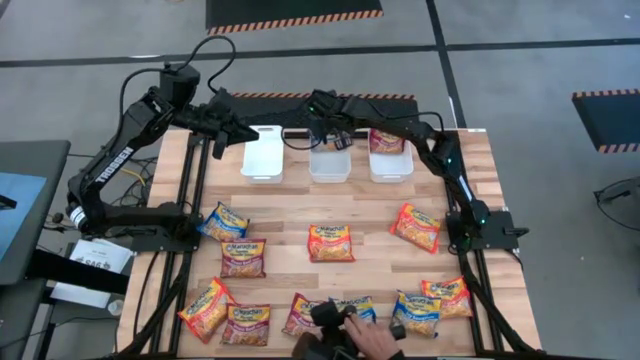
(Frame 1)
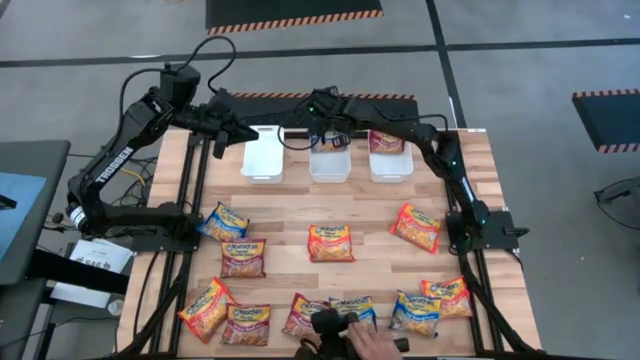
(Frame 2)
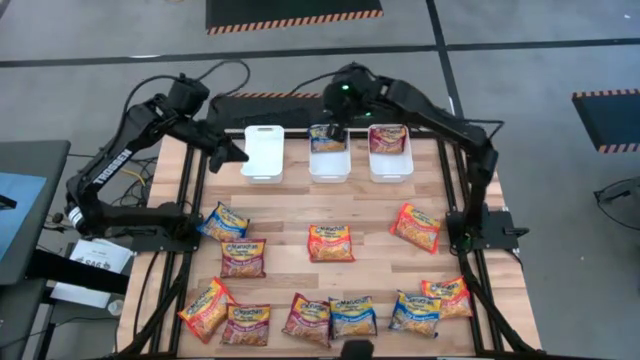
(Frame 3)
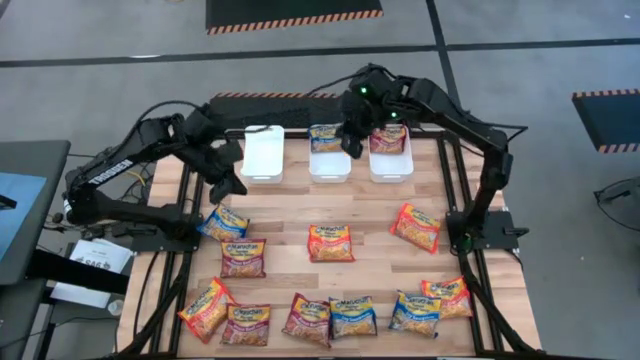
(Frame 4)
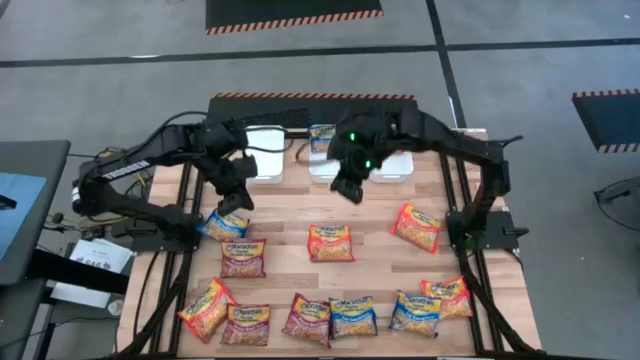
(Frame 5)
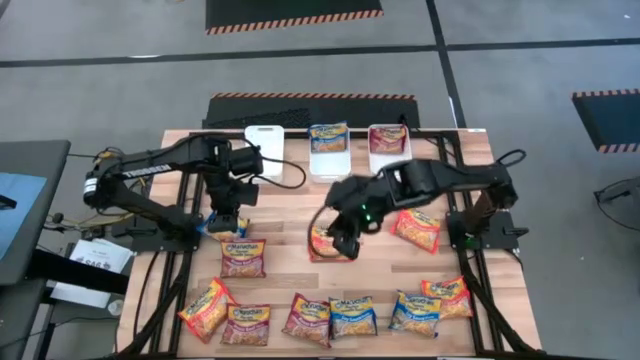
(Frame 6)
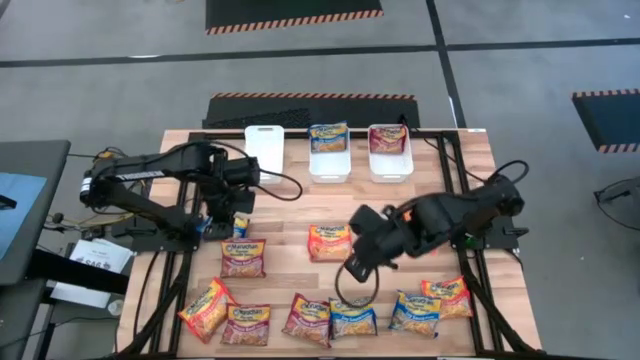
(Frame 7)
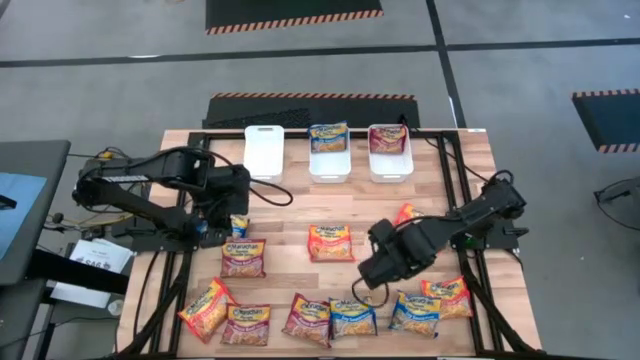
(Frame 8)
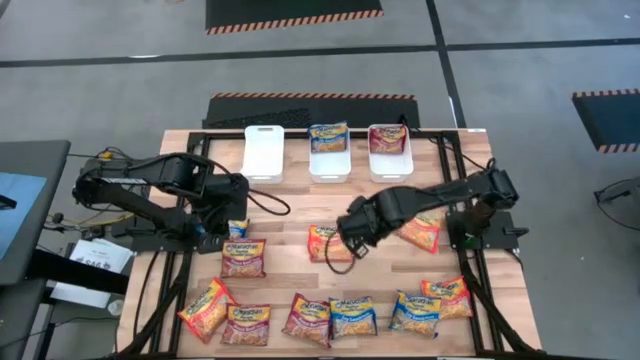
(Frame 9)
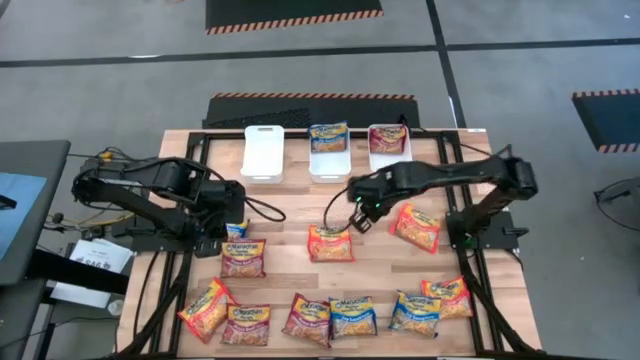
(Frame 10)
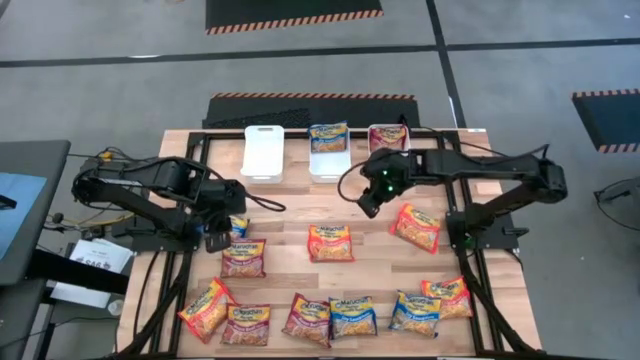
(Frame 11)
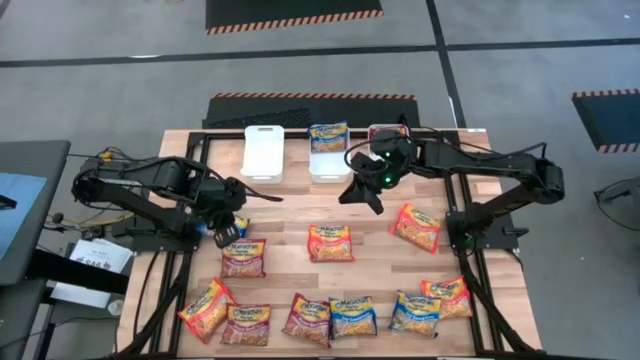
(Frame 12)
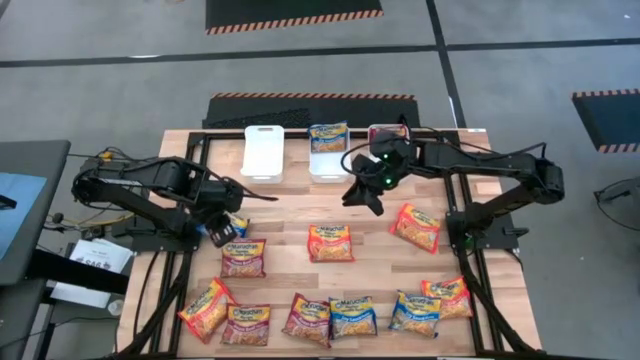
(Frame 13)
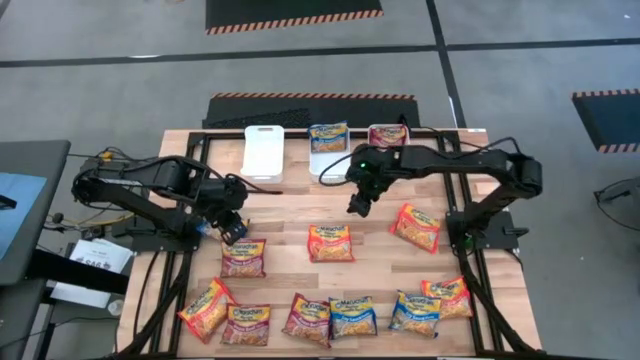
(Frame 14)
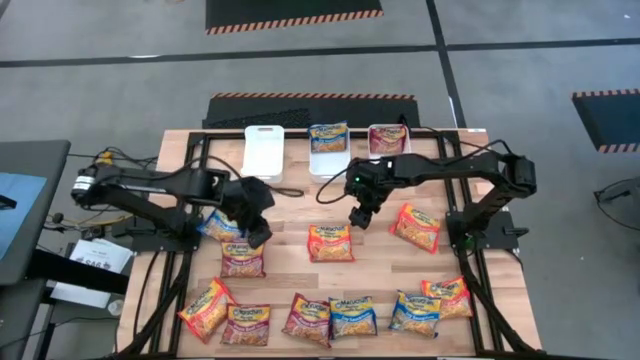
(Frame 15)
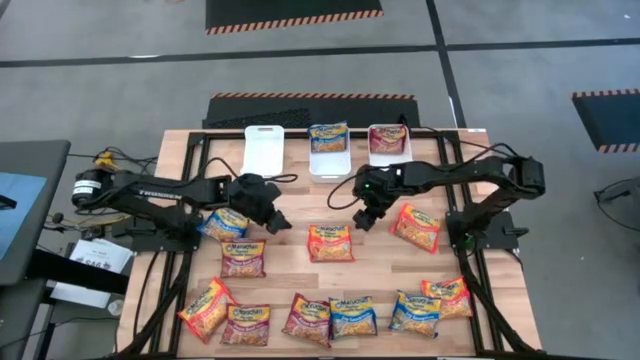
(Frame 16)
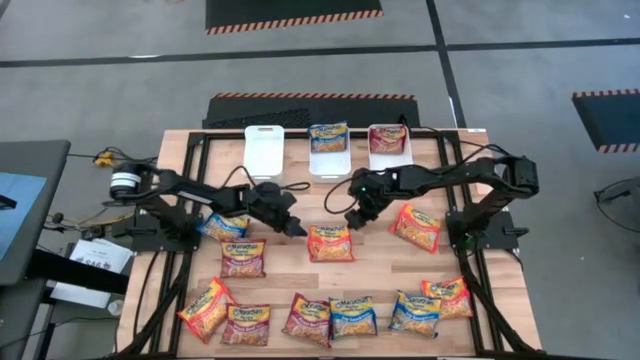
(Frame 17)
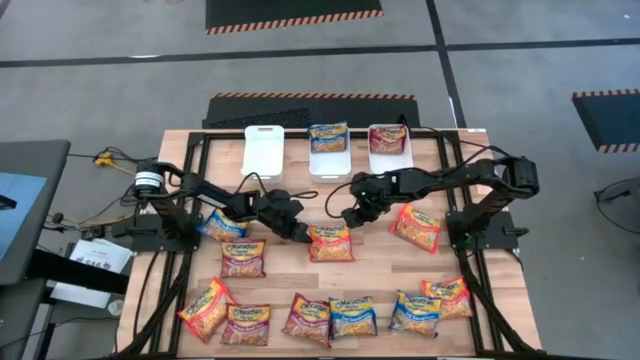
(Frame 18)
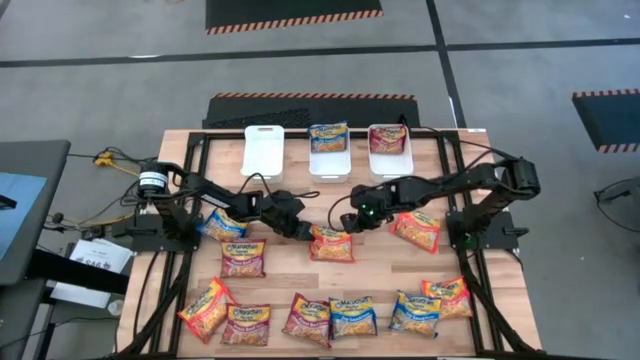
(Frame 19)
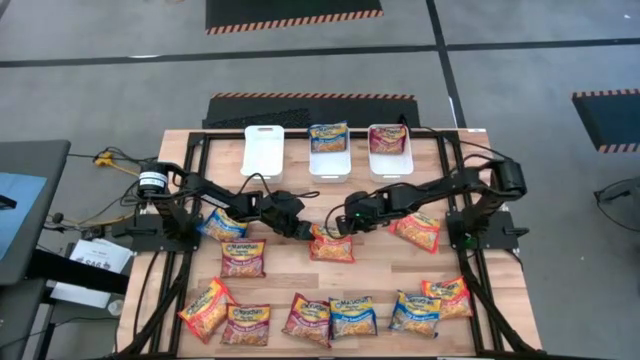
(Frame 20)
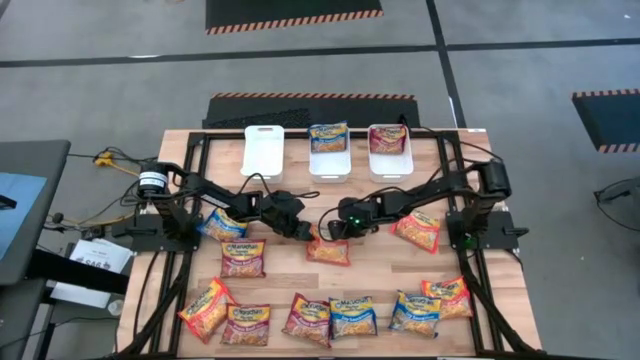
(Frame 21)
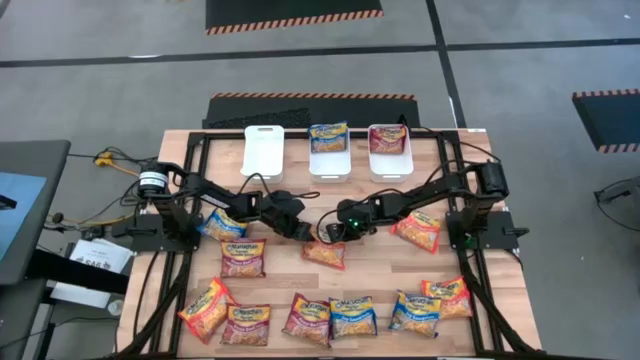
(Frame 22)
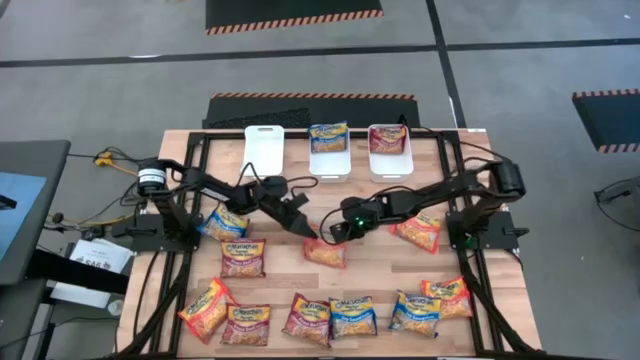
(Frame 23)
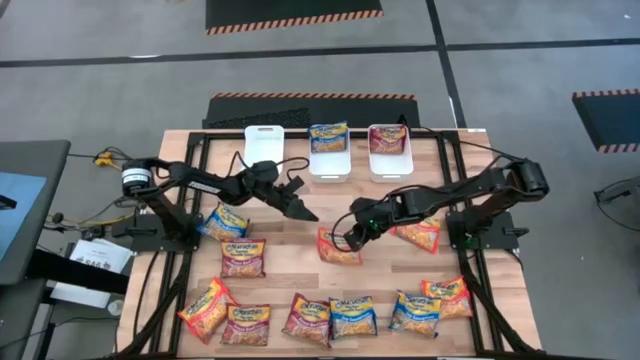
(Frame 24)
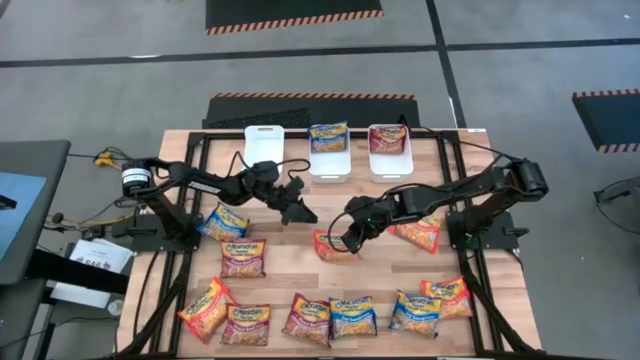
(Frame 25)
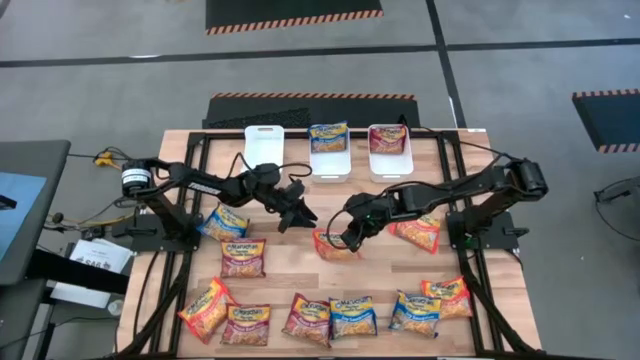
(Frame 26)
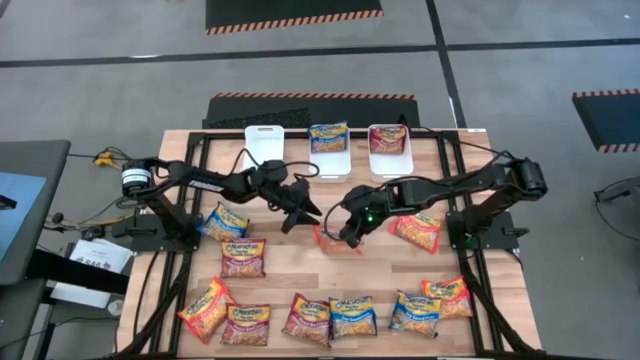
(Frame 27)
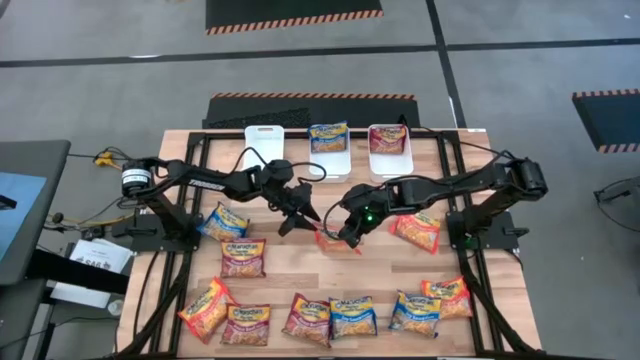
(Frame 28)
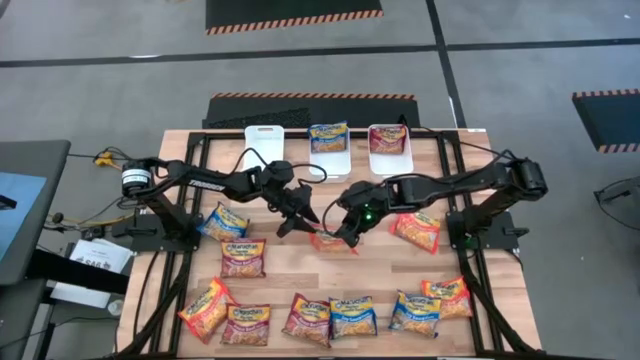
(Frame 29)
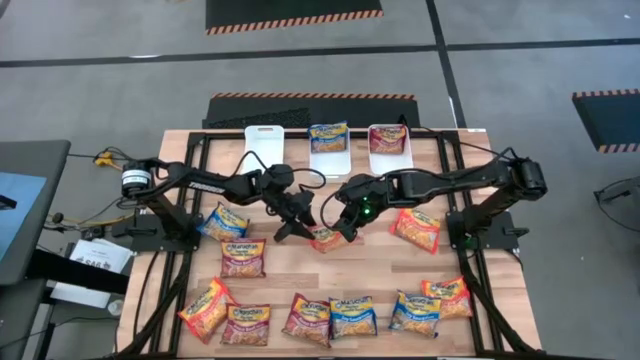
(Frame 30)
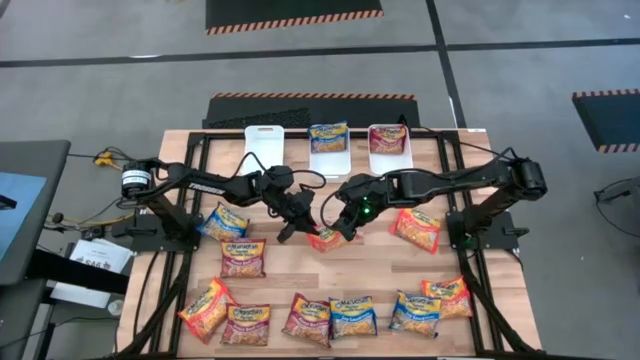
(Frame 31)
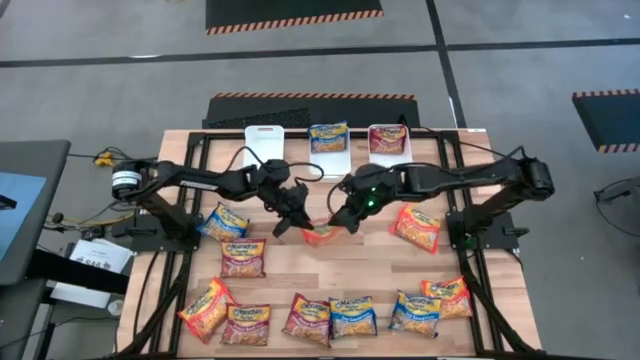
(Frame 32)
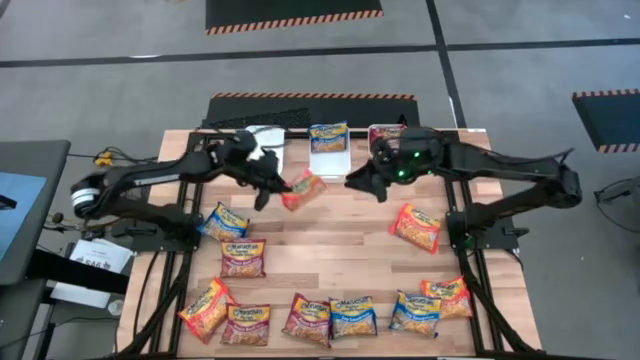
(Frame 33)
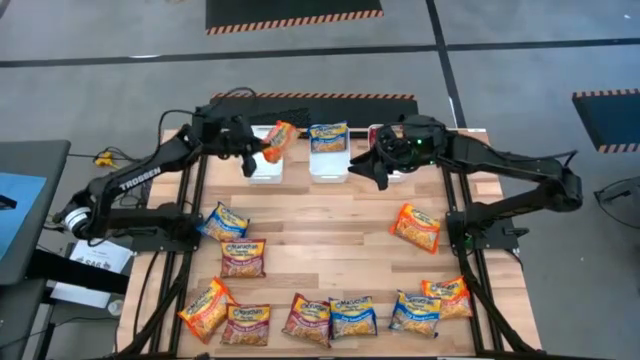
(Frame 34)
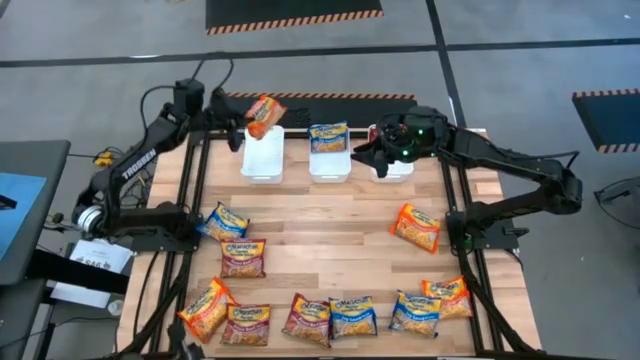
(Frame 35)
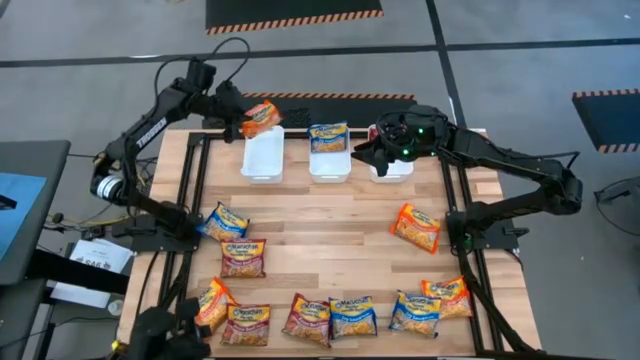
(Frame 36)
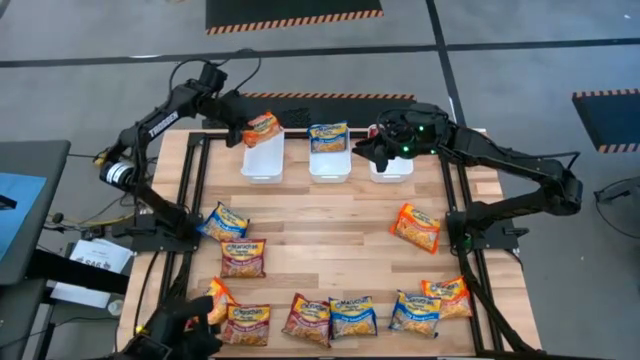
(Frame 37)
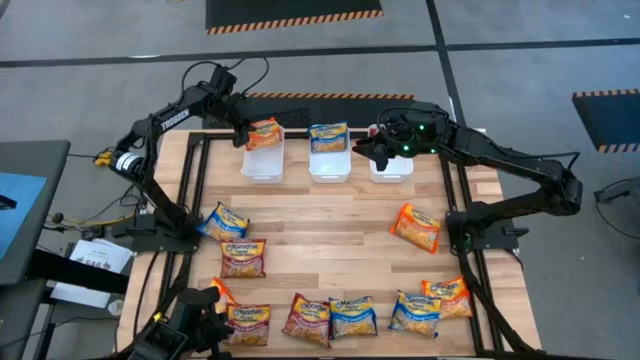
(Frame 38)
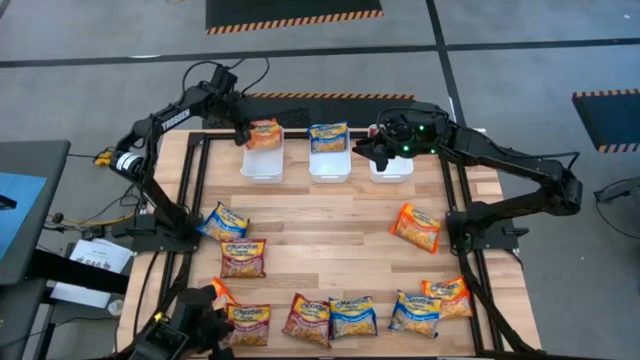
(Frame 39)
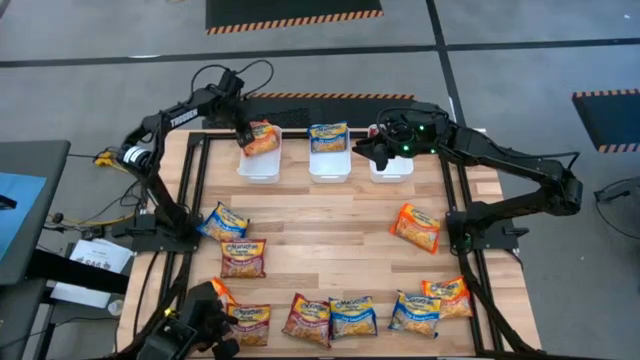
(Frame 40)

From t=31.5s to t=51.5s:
Task: Sort Maruchan noodles
Put the orange noodle pack into the left white bin
